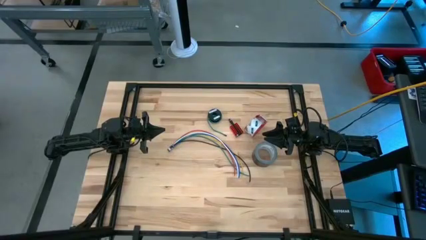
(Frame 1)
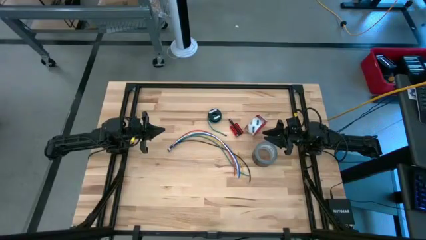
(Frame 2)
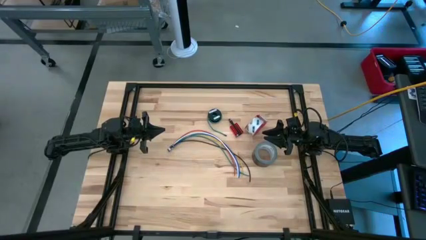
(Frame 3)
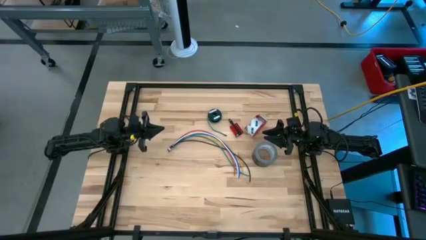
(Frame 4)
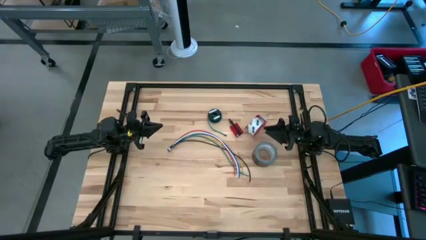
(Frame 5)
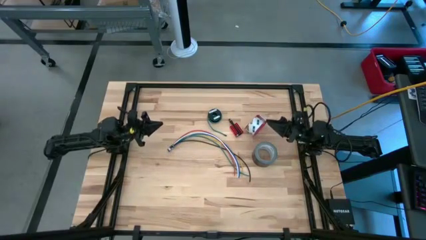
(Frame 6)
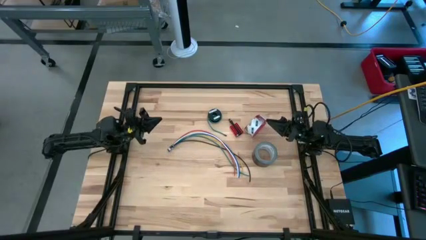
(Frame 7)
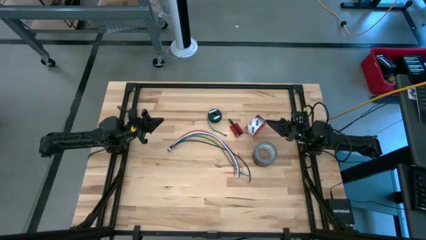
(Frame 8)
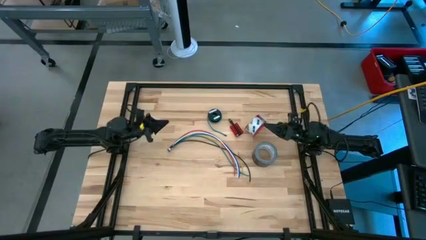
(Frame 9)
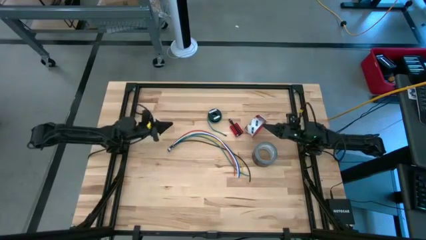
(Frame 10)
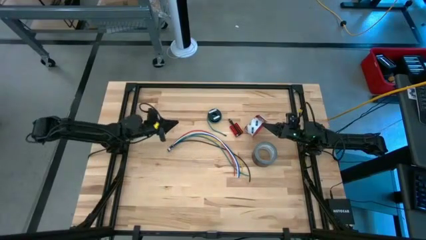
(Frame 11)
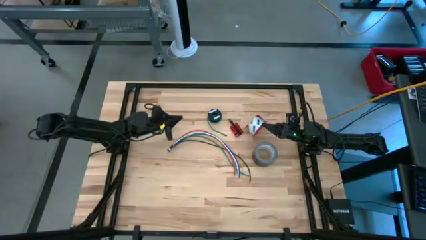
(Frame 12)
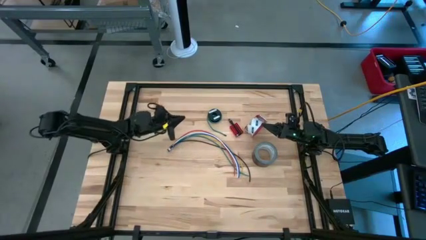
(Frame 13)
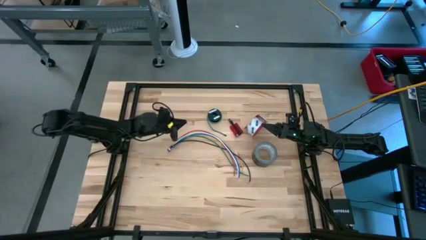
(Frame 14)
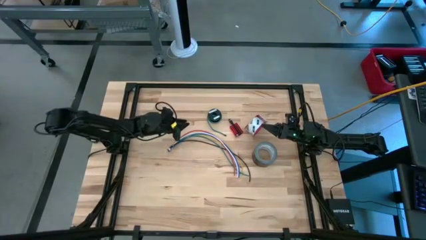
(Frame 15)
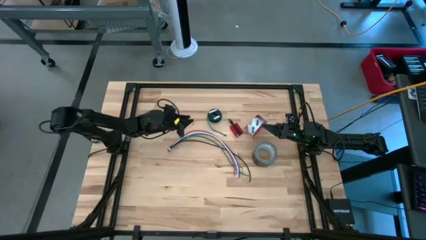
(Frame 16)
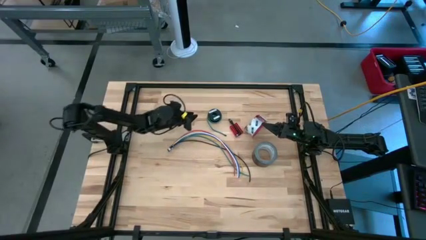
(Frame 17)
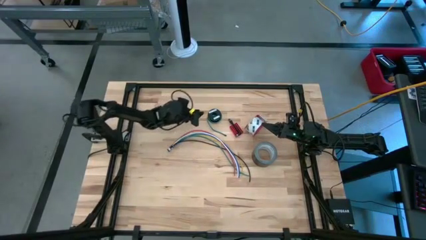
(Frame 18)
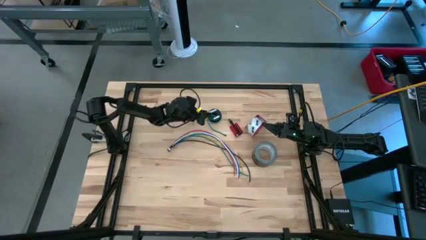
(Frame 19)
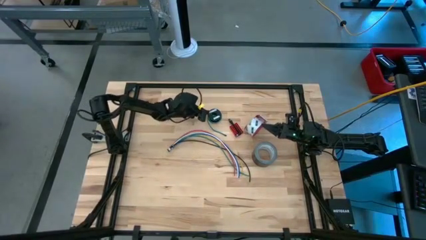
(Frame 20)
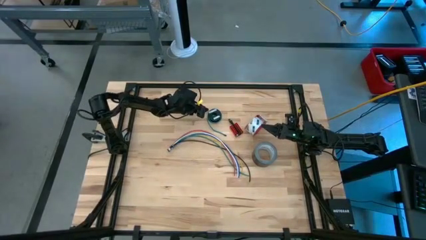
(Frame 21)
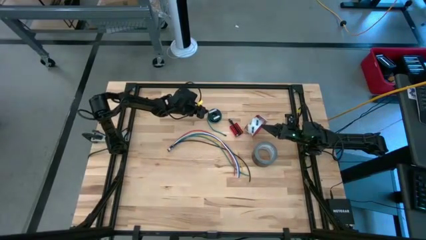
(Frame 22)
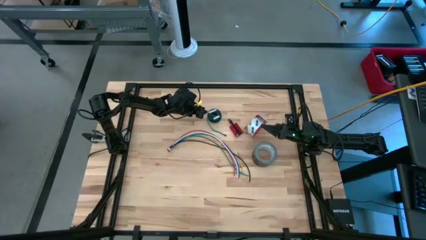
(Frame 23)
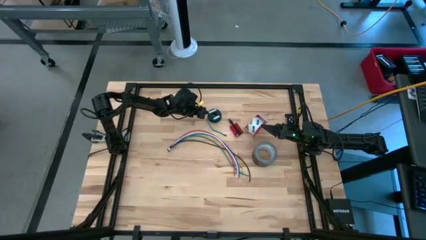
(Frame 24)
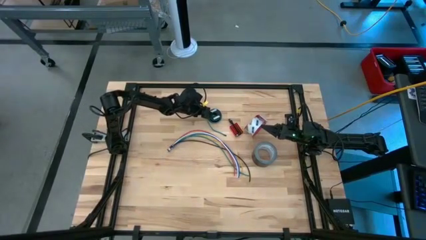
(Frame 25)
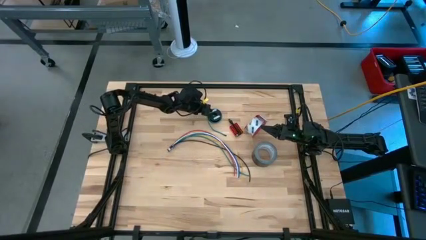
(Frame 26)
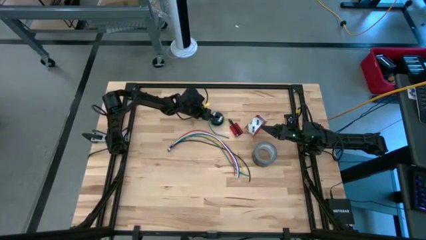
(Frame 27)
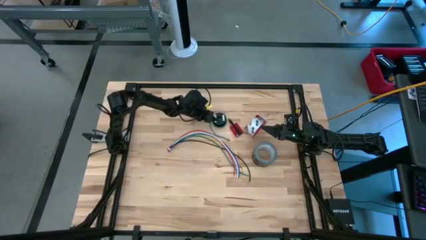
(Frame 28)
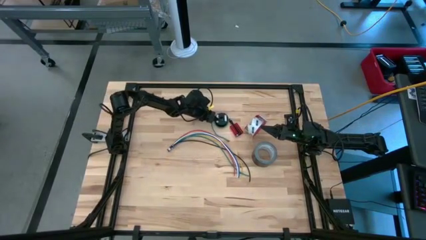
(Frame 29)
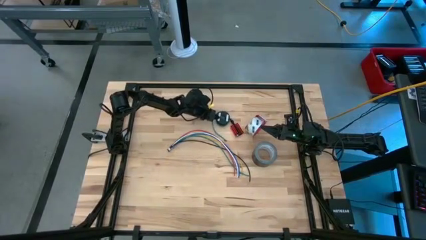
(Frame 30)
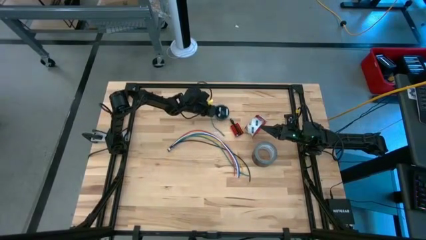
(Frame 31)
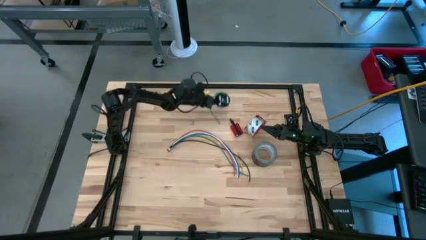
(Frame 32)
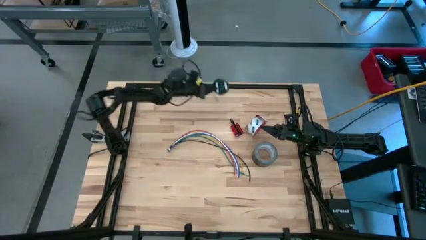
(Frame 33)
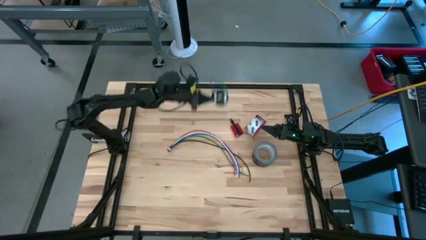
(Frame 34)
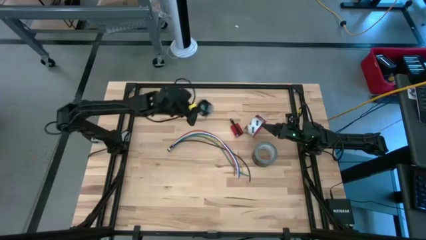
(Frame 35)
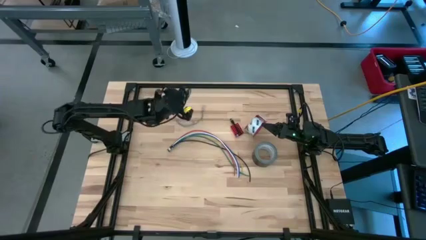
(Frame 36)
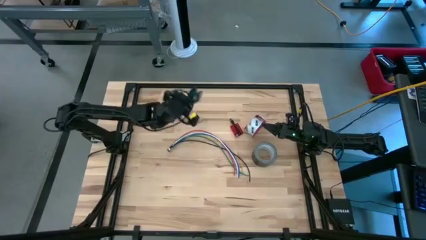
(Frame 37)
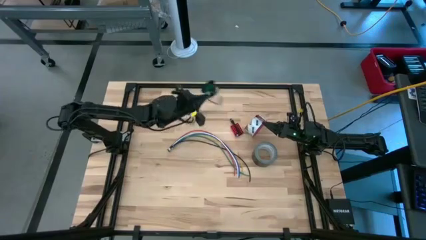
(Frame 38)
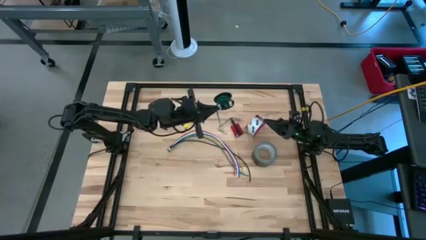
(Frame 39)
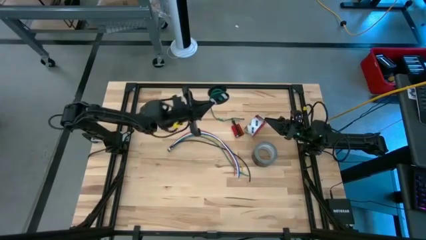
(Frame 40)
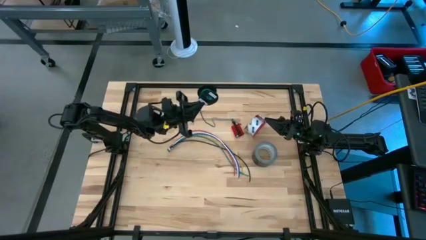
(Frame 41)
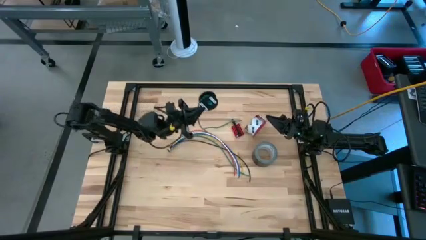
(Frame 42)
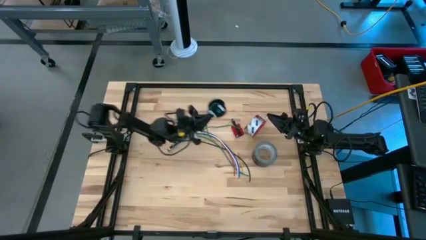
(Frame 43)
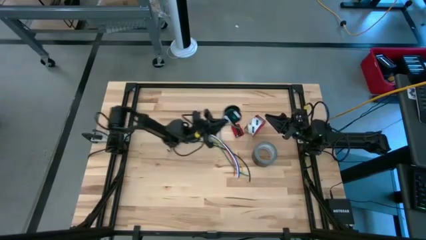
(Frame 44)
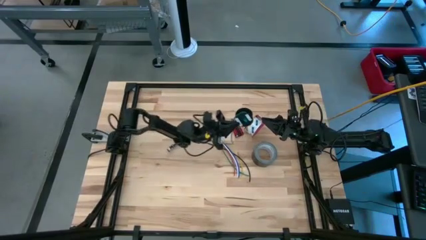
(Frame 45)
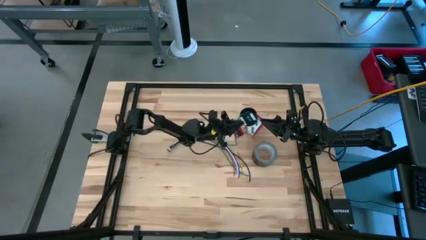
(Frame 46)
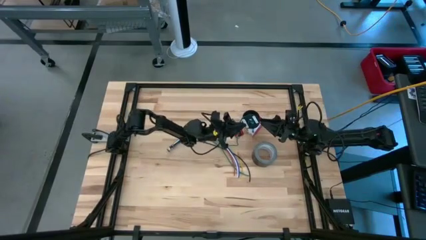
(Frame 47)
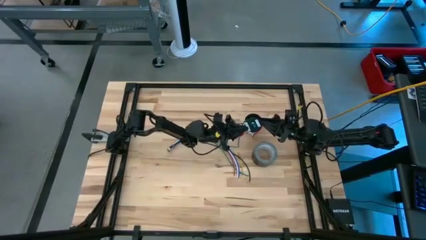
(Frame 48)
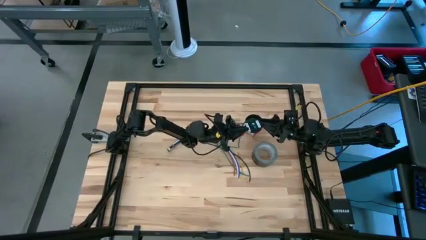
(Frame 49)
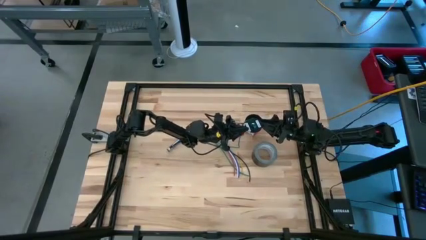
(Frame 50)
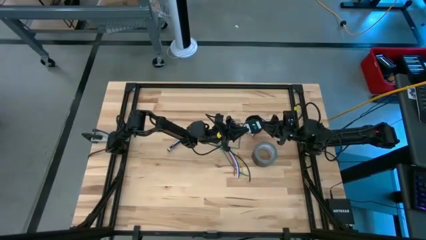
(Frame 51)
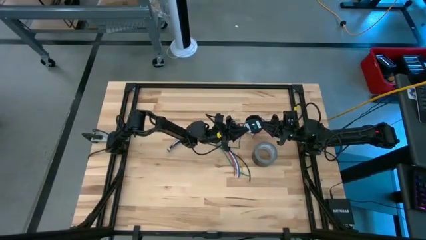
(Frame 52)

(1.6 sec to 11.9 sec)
Task: Coil cords
Uncoil green wire from the black spool

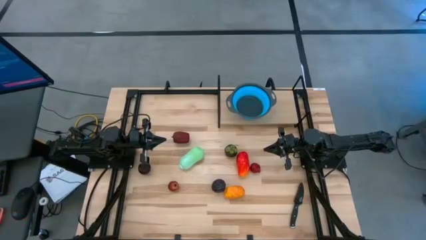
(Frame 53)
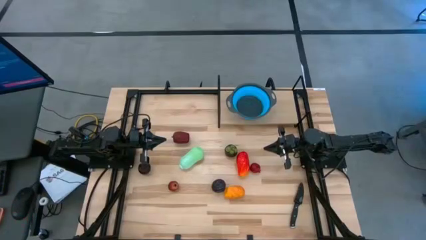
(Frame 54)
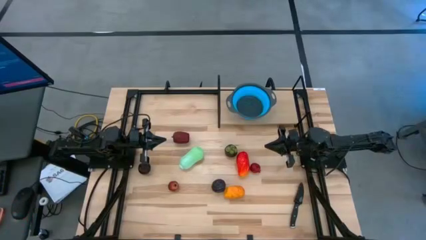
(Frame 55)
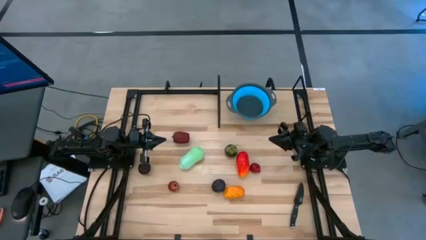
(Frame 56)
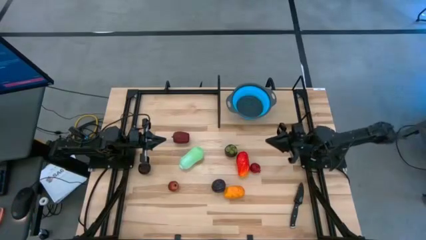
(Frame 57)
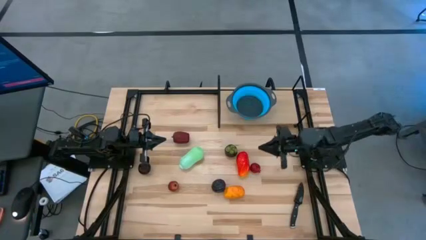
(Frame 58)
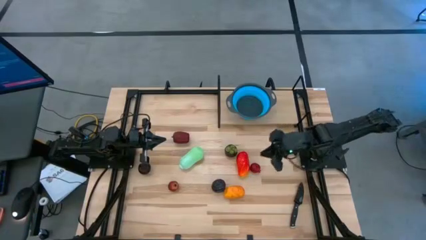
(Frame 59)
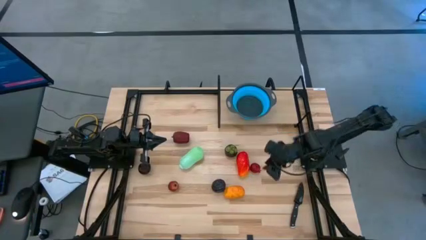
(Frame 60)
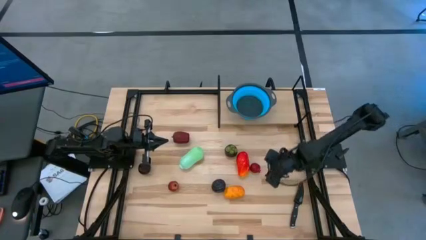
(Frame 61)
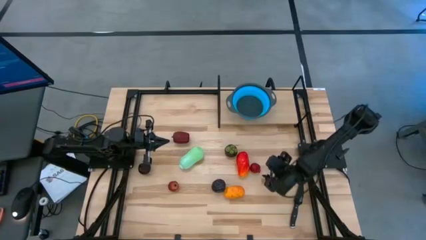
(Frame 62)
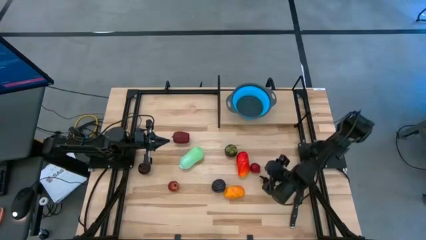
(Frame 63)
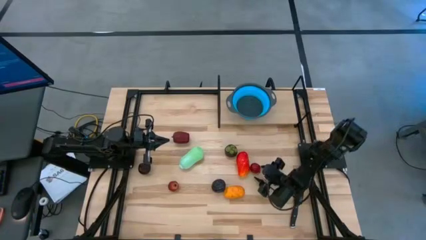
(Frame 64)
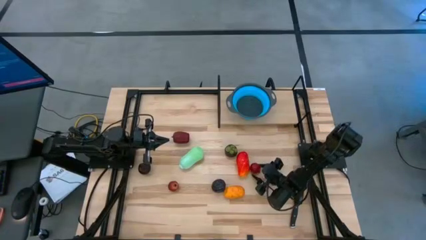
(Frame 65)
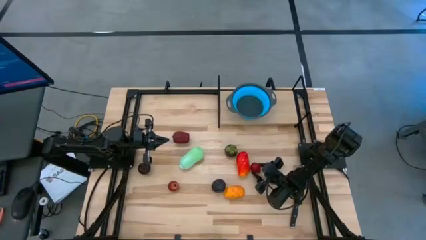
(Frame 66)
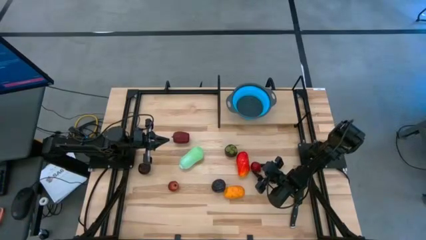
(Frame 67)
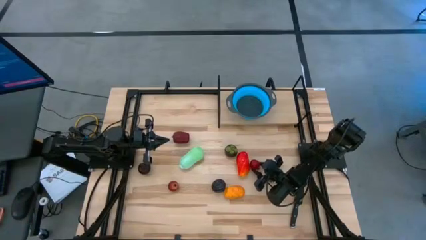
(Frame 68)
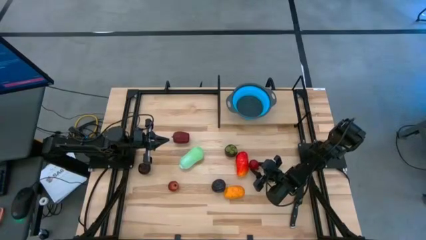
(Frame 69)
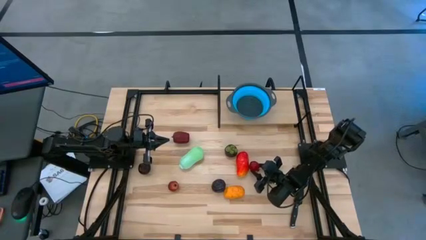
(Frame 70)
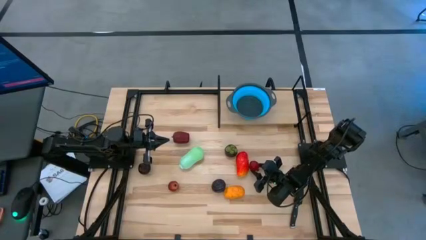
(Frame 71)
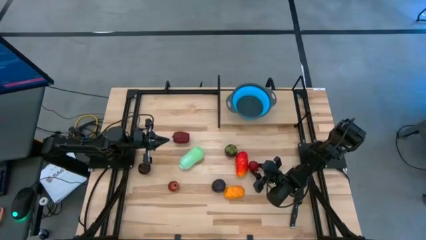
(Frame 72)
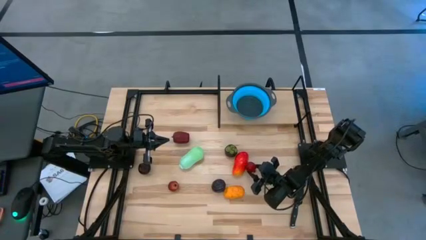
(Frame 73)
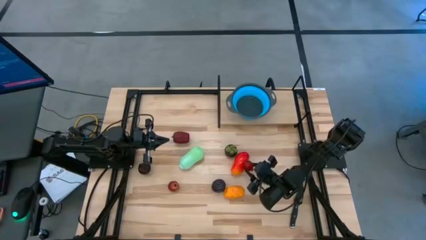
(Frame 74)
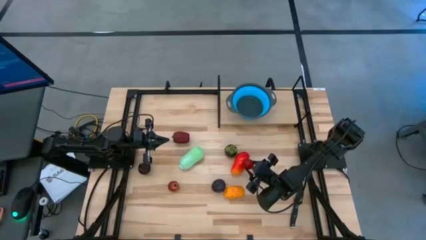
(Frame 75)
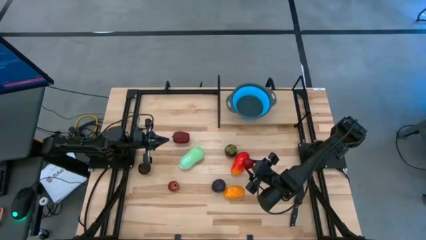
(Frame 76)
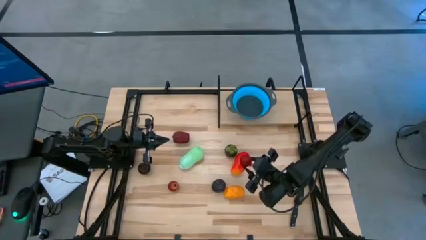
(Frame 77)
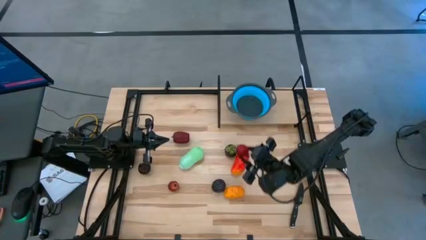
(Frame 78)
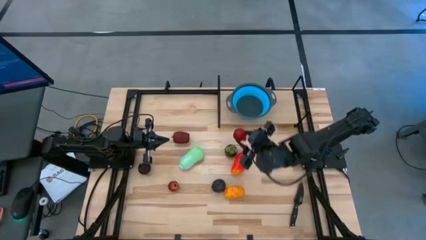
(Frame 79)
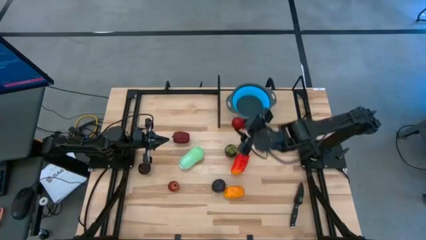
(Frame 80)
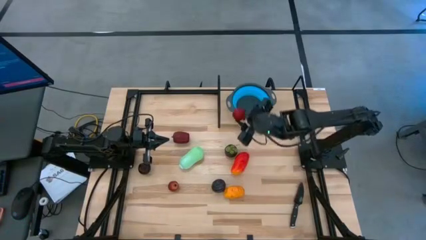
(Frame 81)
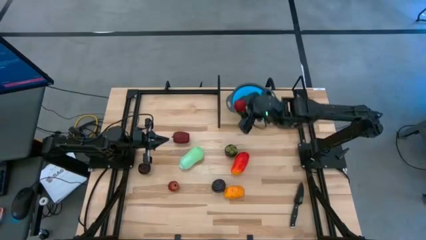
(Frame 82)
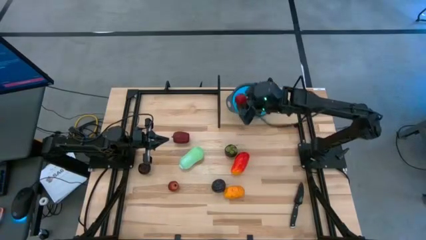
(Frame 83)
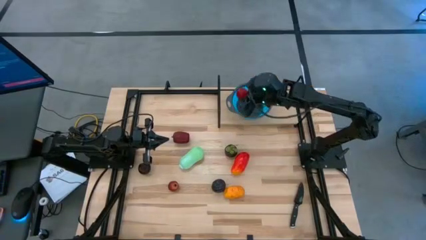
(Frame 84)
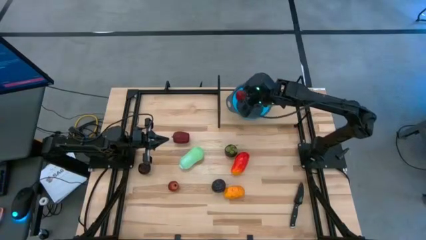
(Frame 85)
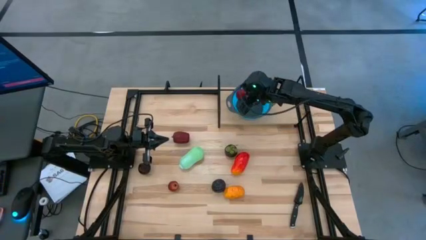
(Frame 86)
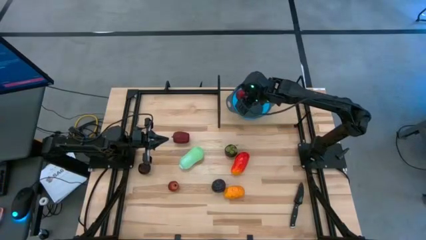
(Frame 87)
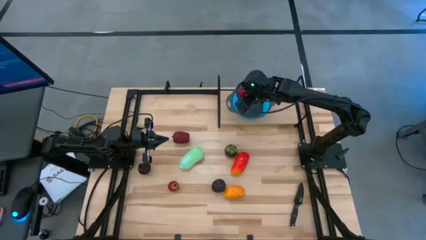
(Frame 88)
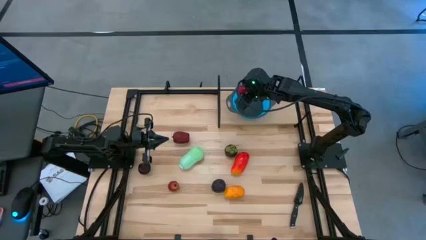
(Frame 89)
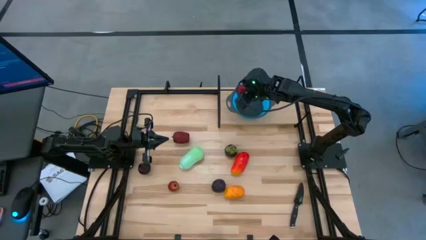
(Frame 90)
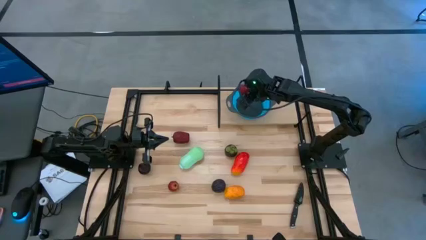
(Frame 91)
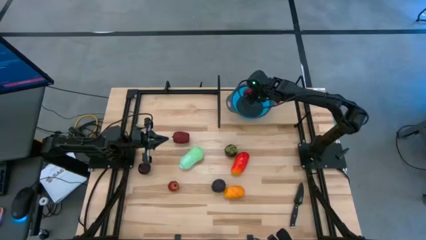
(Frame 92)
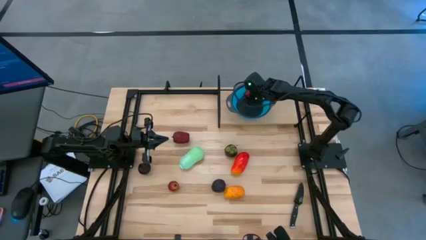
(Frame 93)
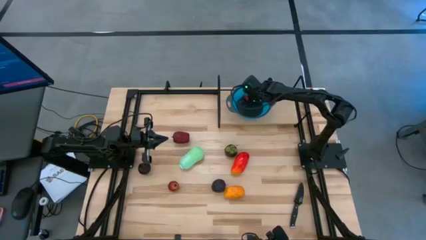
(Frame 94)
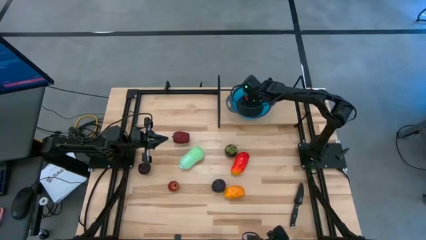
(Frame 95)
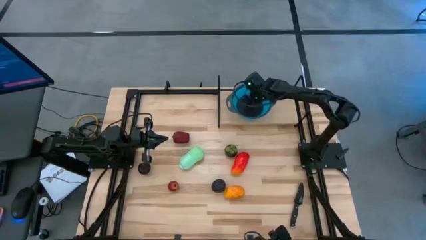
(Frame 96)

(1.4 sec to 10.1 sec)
Task: Pick & Place Fruit
Put the top red pomegranate into the blue strainer bowl on the shelf
